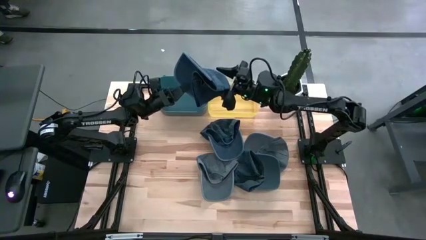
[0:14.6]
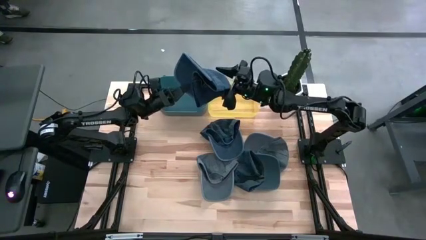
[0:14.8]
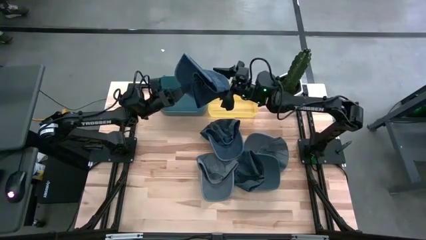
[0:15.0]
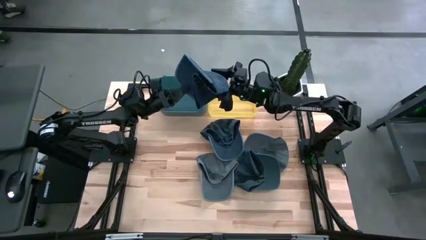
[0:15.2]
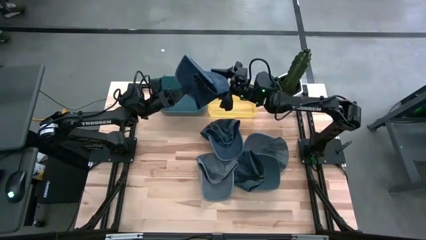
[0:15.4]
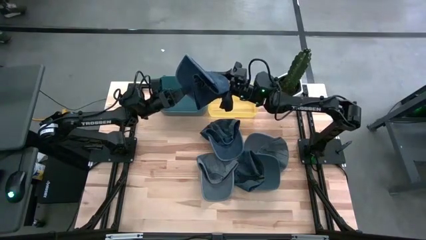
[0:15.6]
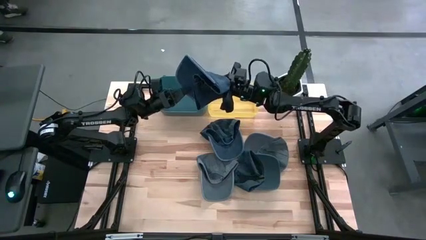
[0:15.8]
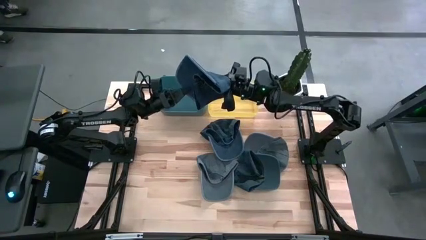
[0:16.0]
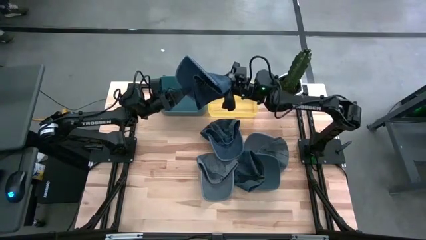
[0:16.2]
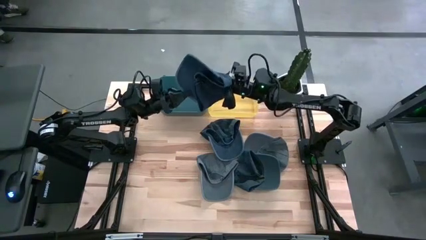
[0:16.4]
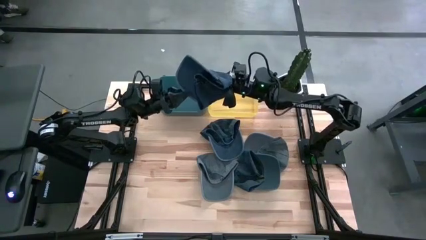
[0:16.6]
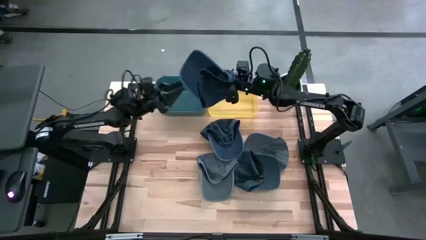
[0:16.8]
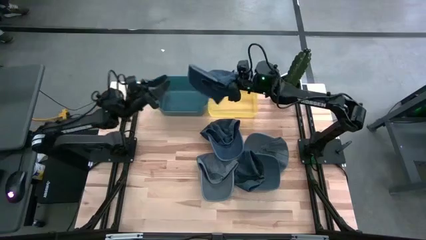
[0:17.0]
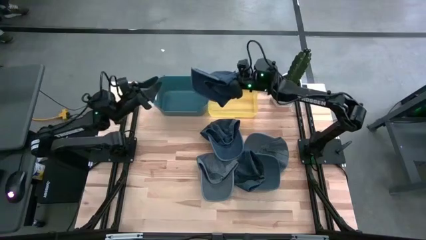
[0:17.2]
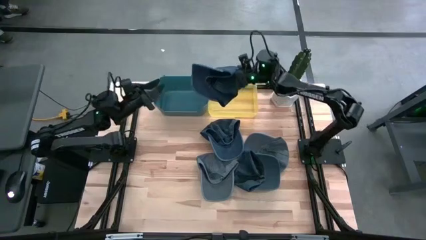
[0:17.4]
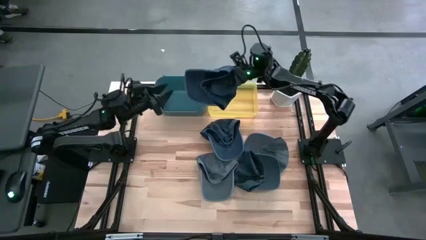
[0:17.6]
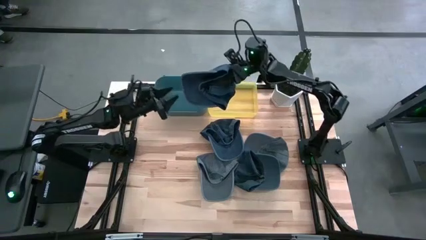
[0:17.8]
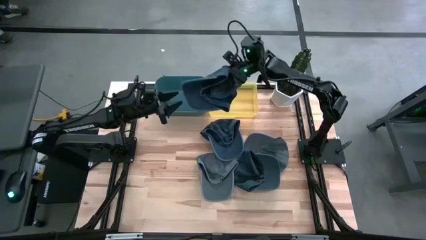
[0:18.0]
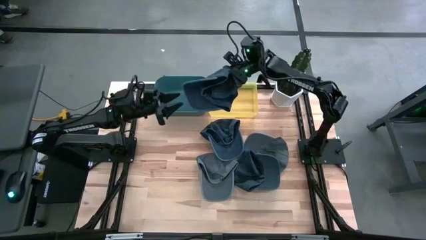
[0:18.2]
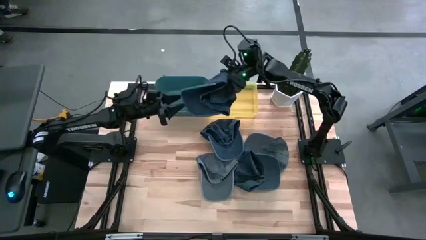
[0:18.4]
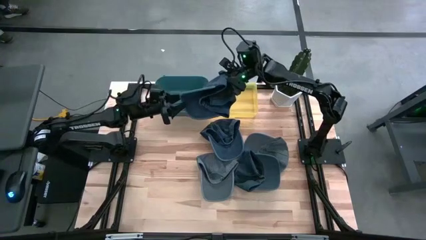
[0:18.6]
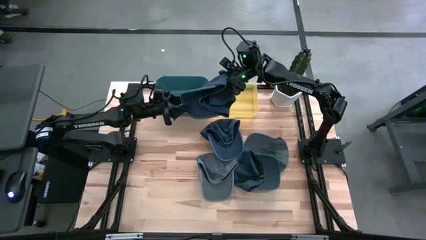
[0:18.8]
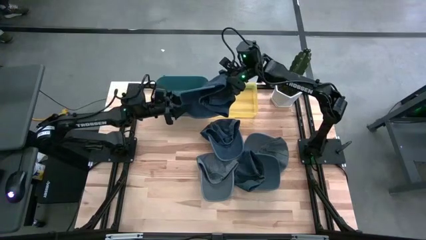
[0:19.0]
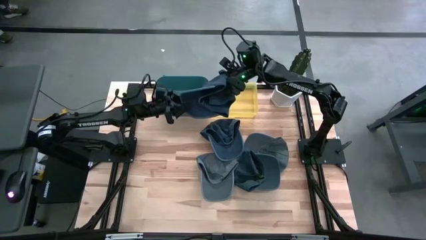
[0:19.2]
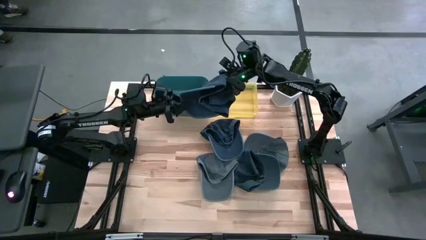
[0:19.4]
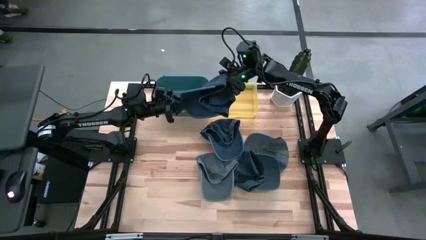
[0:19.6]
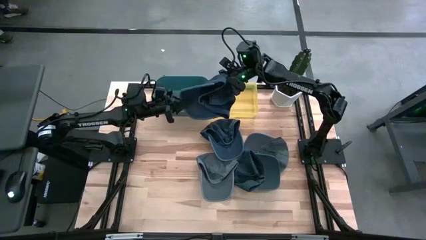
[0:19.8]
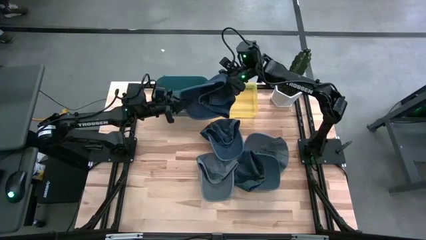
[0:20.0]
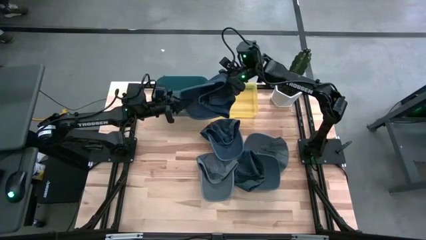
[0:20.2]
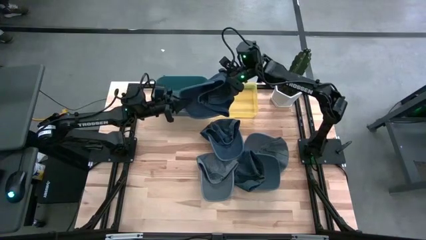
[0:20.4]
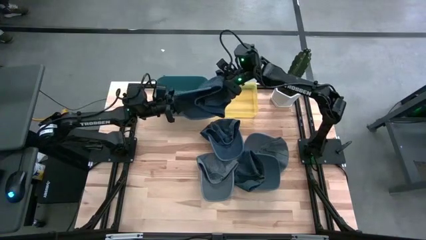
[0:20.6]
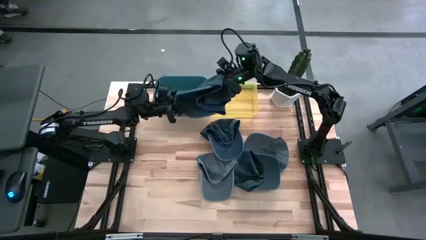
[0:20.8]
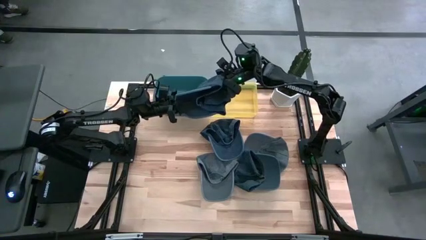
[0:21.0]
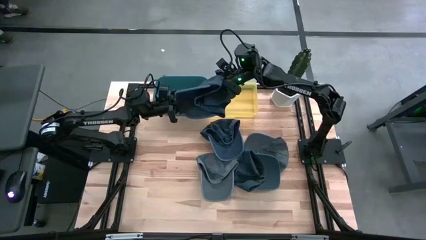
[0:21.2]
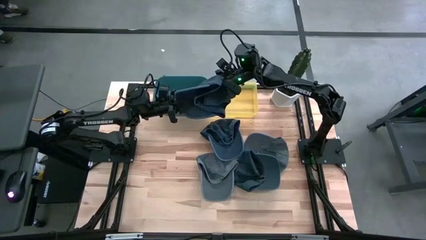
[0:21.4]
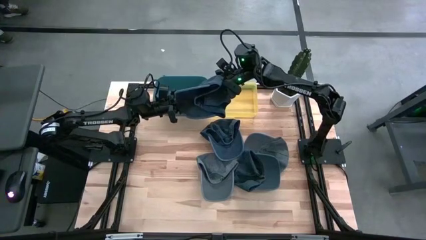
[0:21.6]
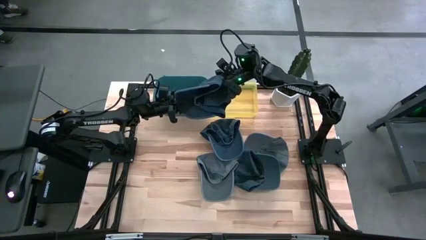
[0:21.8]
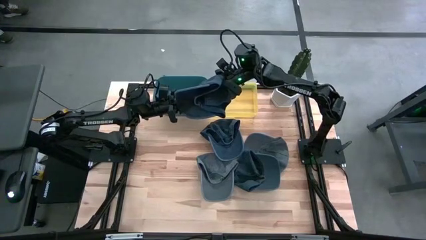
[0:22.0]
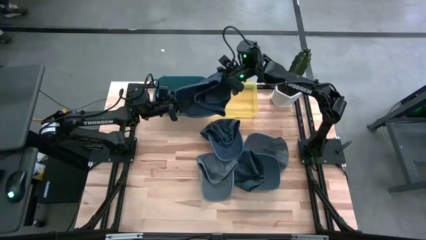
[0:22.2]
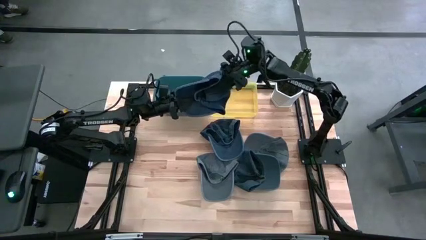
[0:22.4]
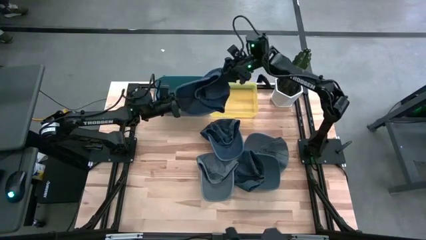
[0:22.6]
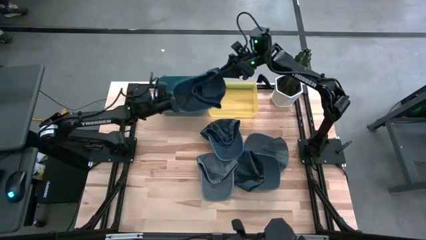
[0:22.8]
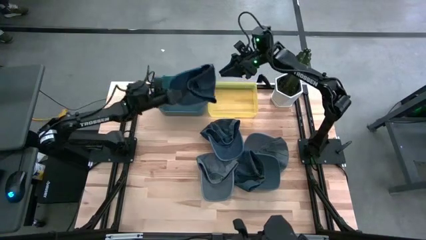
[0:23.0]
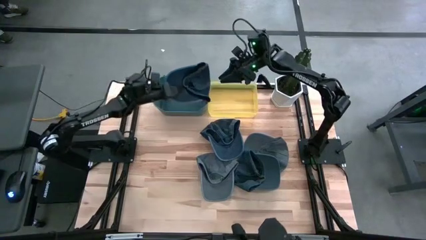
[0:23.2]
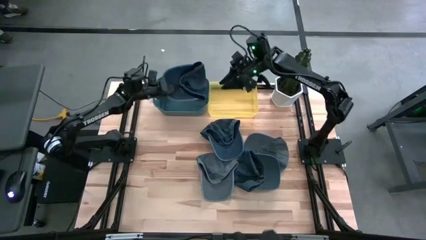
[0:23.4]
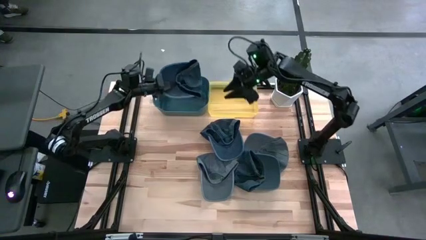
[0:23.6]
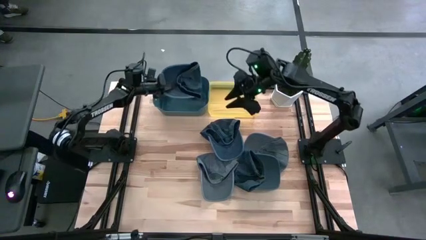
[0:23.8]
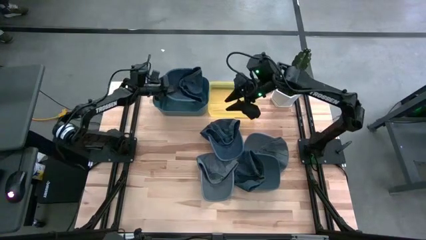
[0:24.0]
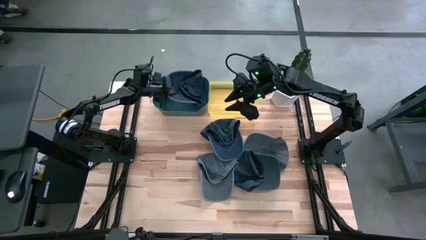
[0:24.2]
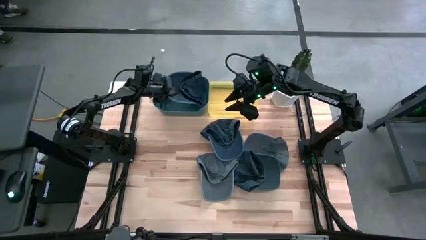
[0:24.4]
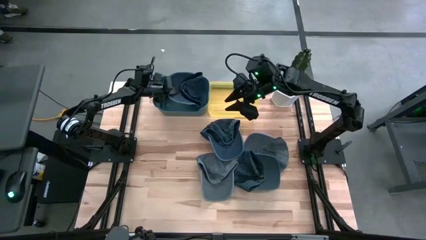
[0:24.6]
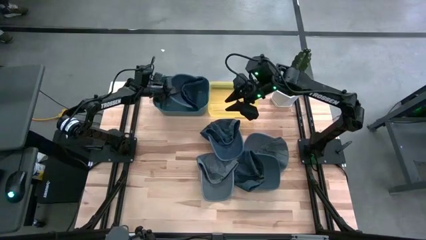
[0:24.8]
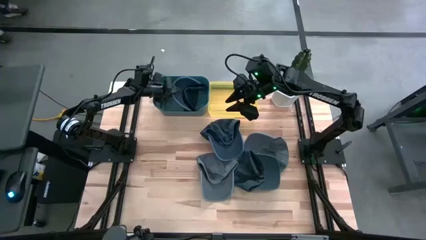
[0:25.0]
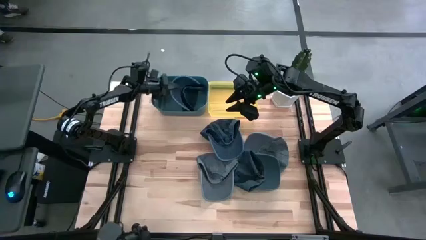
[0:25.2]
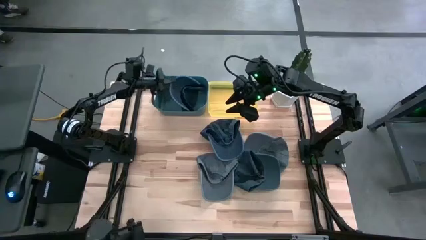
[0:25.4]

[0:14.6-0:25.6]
Task: Pick & Place hat
Put the left blue cap into the blue bin

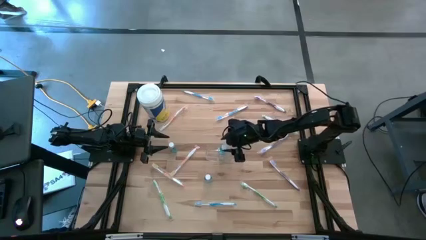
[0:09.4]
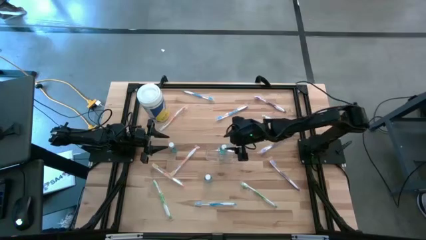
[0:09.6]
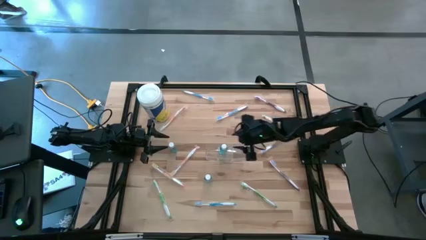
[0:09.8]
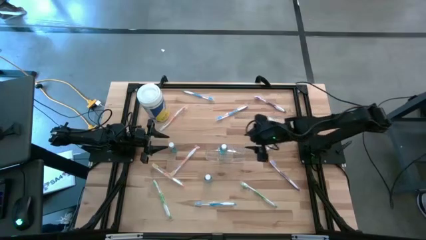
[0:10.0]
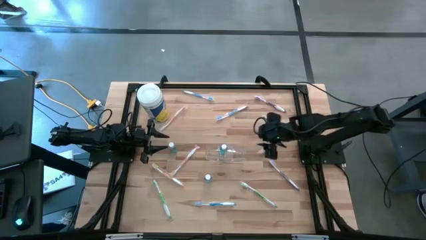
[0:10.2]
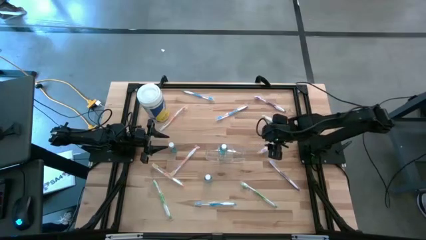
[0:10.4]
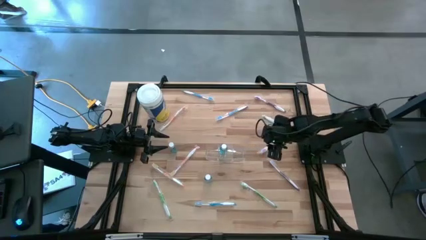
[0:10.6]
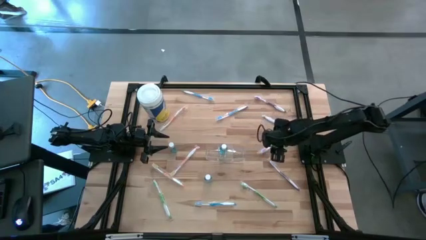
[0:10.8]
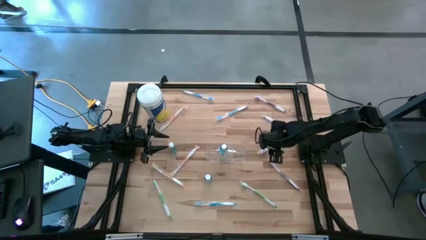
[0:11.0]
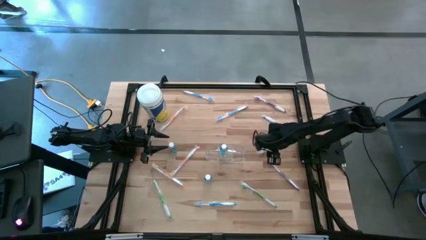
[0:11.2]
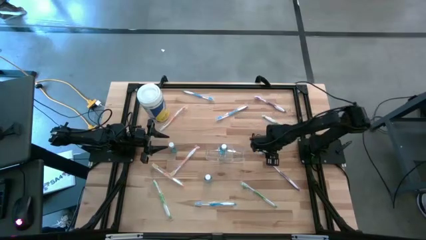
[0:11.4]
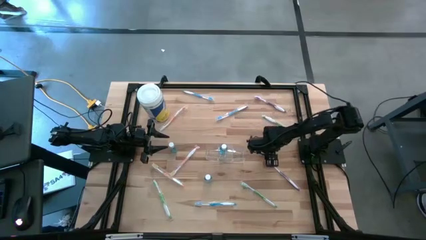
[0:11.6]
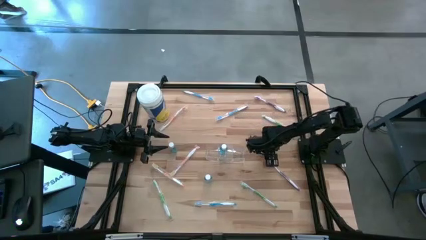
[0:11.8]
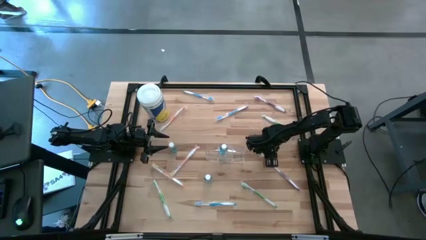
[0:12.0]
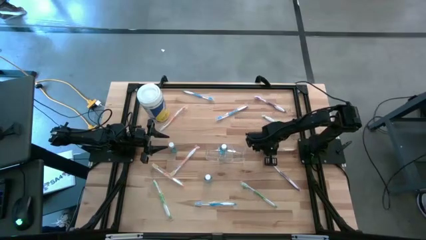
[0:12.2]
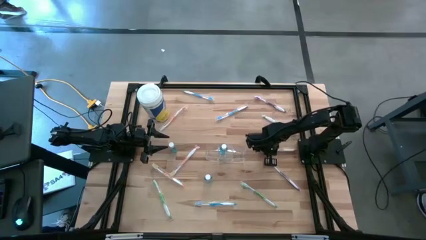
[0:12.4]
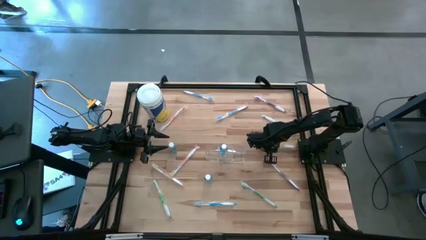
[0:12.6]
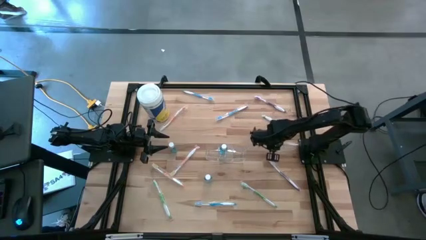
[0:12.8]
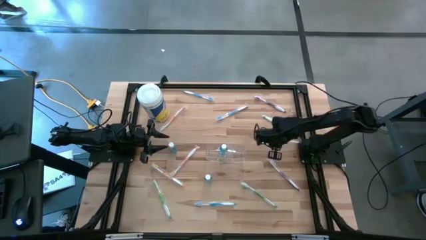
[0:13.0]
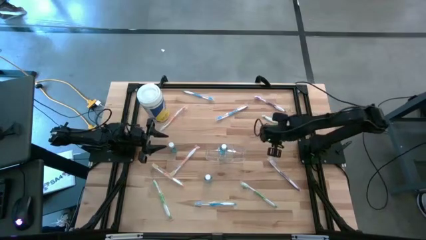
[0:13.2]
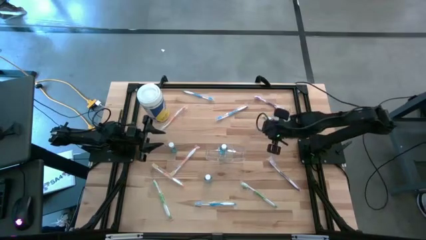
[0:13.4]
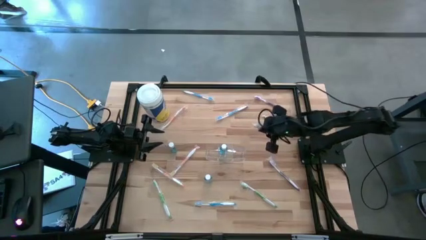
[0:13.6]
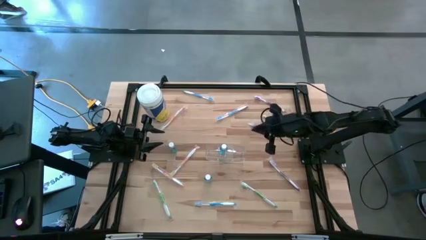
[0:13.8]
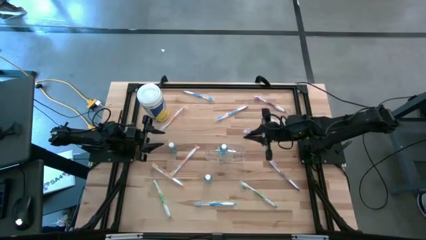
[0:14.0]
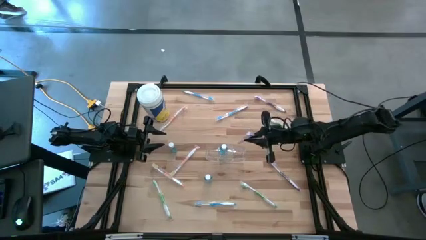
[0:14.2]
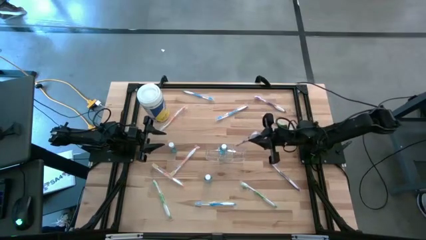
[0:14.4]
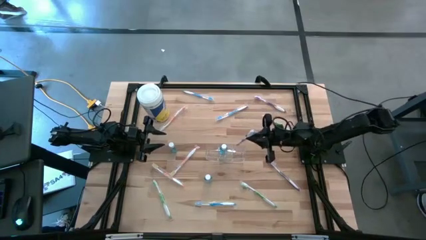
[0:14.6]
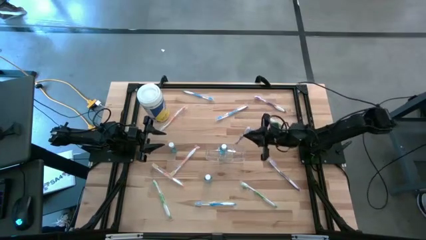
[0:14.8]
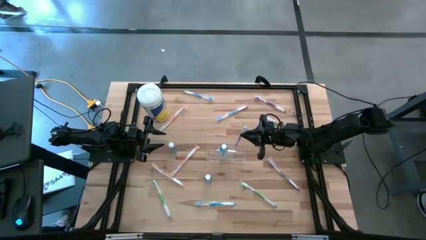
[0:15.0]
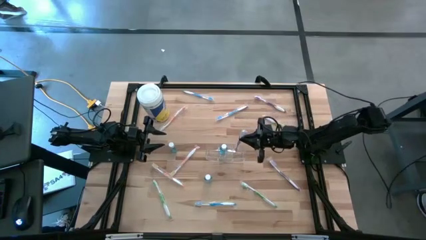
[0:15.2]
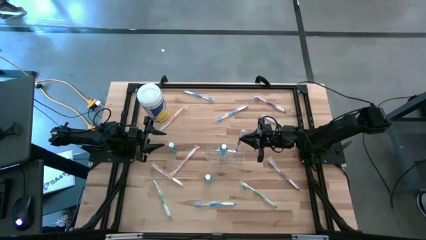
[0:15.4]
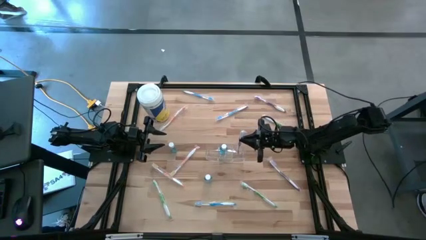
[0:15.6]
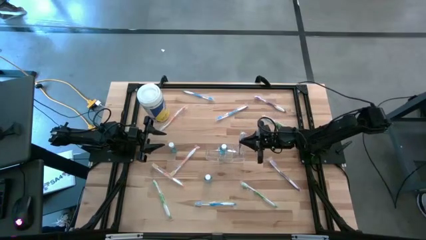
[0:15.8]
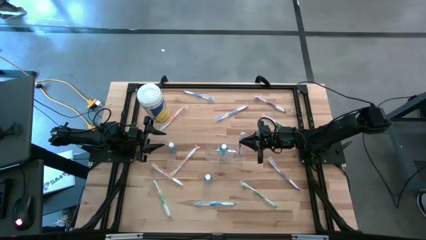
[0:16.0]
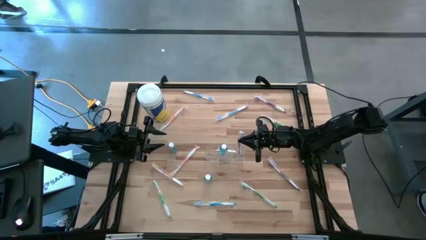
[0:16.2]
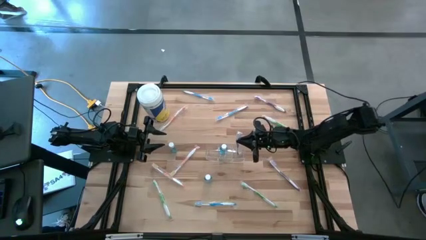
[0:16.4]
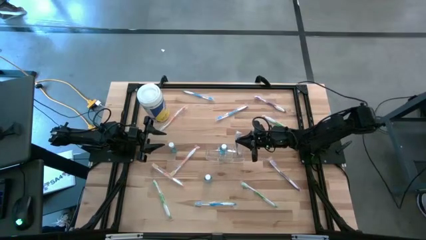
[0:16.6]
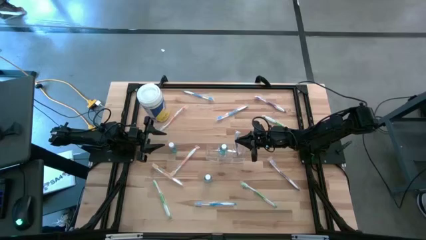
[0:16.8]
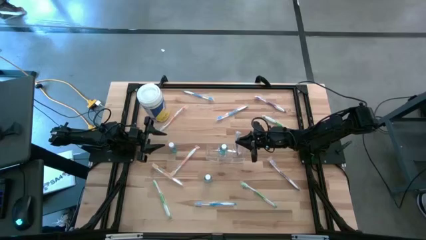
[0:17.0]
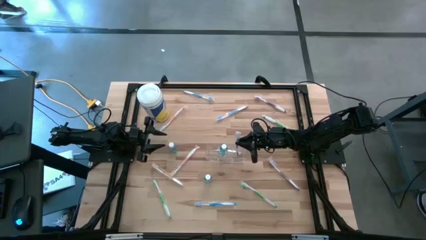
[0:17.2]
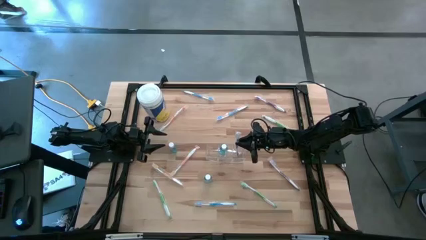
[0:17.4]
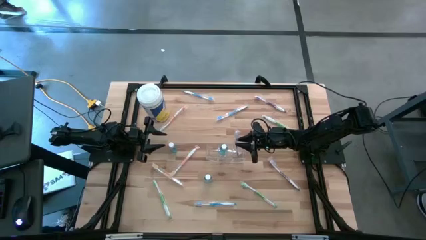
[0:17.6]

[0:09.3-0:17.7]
Task: Pick & Place toothbrushing station
Put the middle purple toothbrush into the transparent organizer
